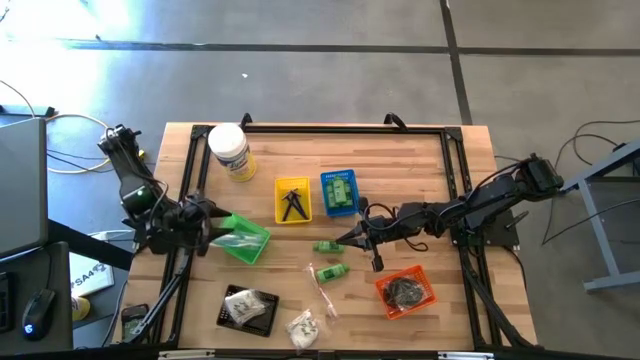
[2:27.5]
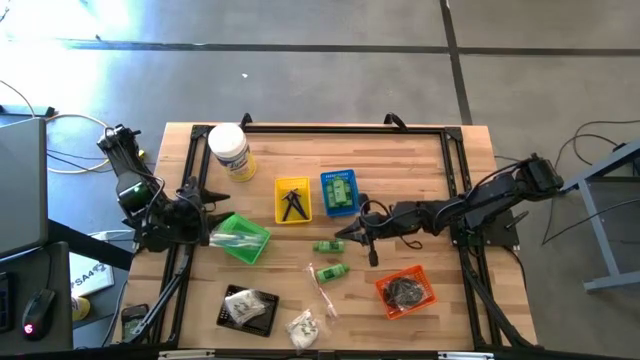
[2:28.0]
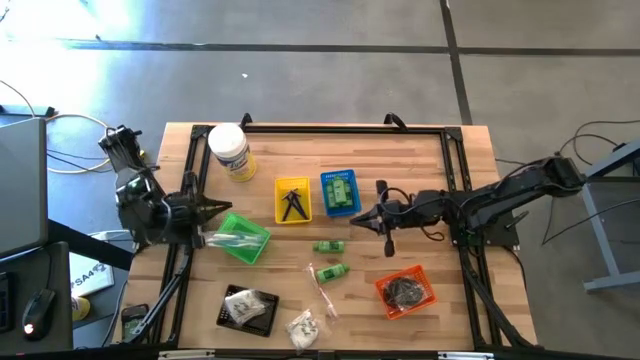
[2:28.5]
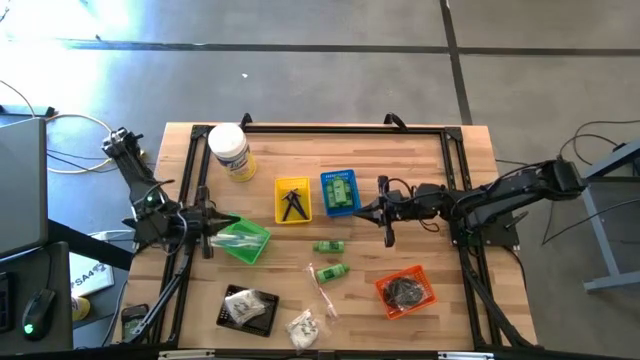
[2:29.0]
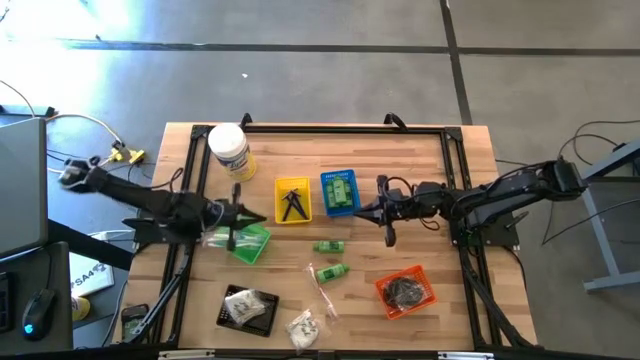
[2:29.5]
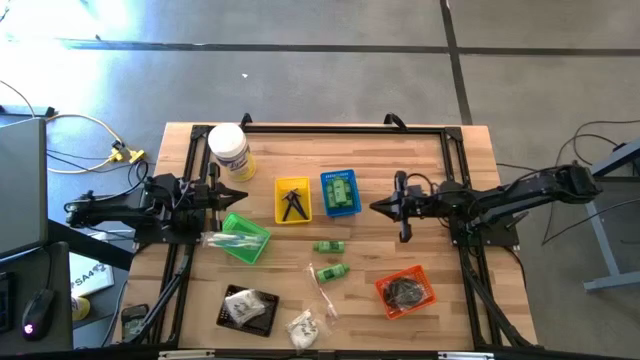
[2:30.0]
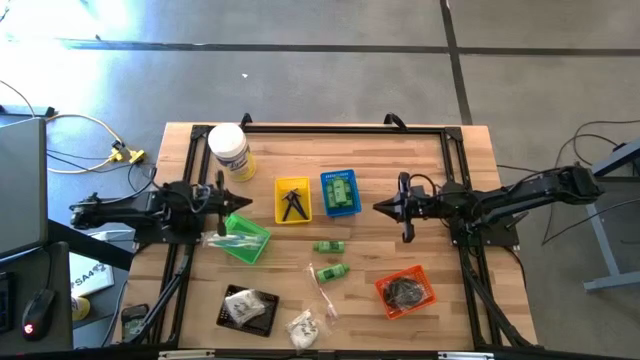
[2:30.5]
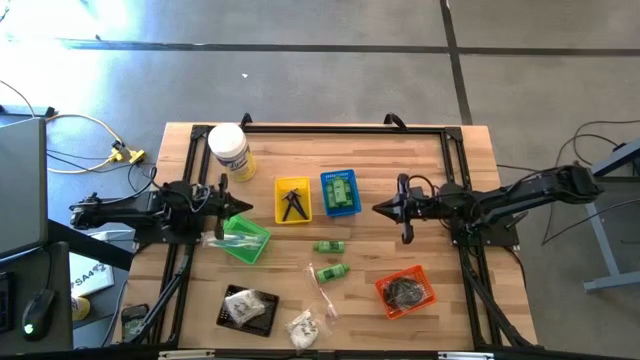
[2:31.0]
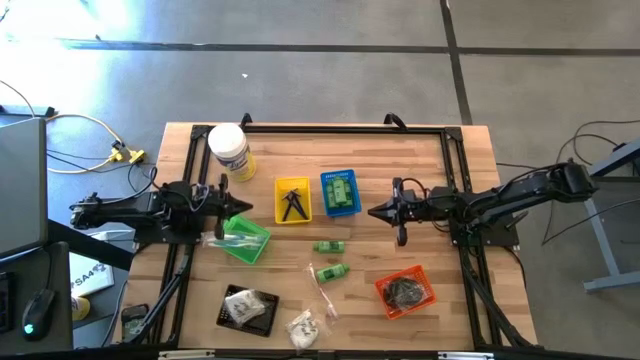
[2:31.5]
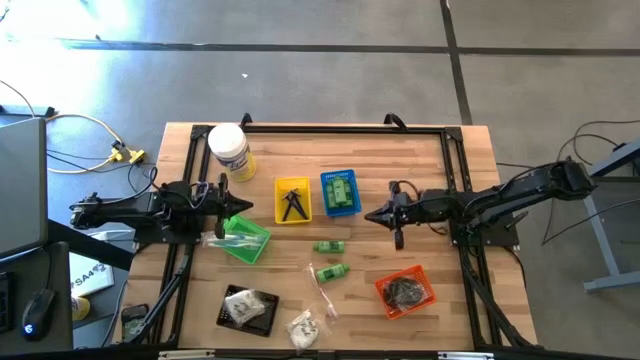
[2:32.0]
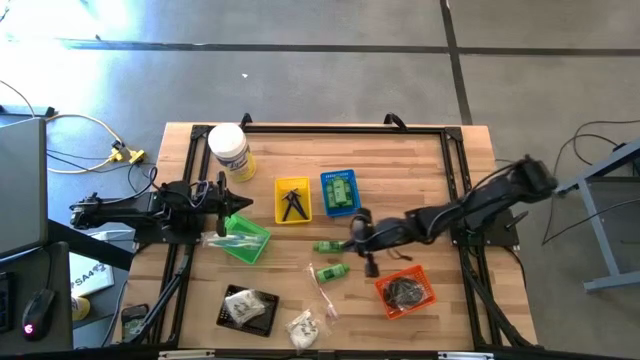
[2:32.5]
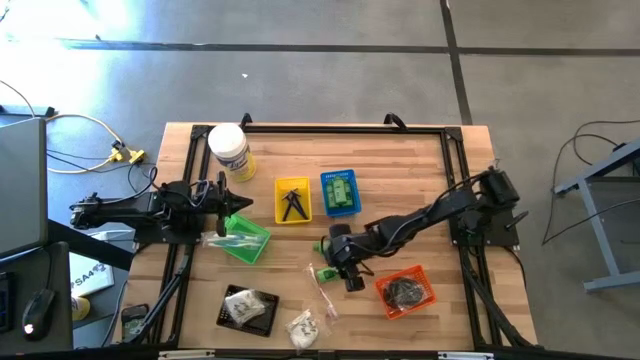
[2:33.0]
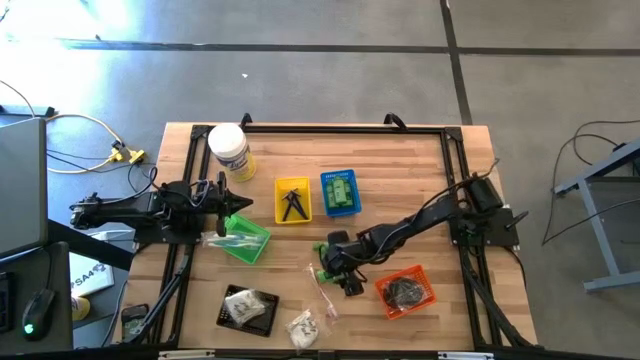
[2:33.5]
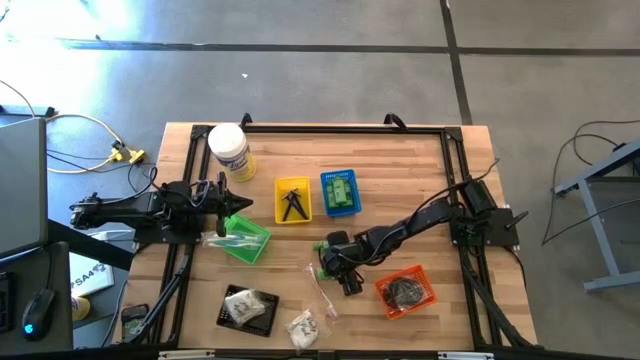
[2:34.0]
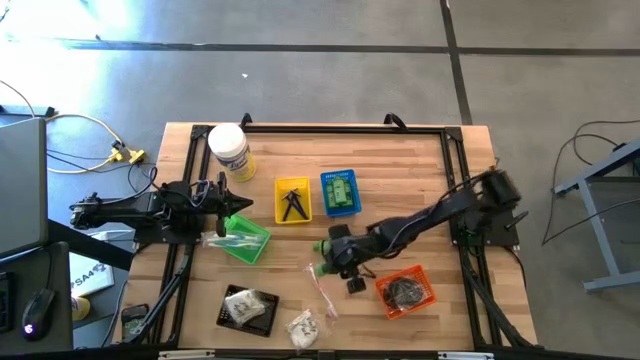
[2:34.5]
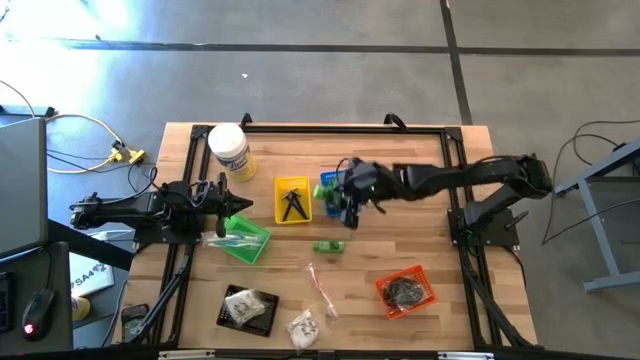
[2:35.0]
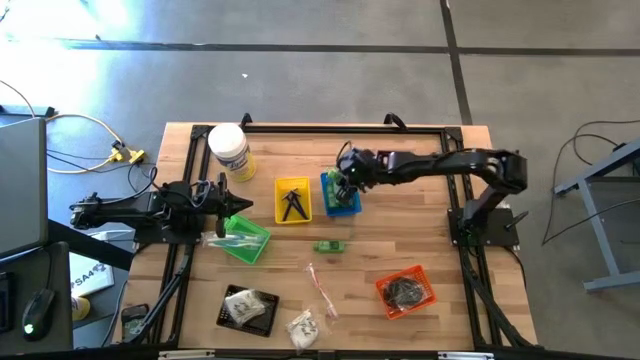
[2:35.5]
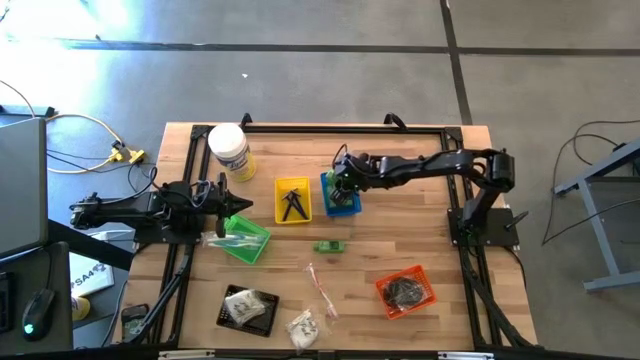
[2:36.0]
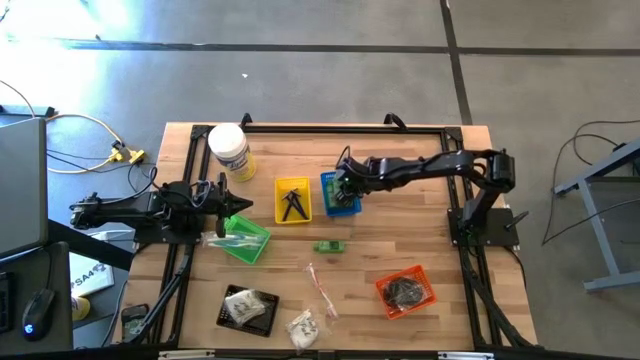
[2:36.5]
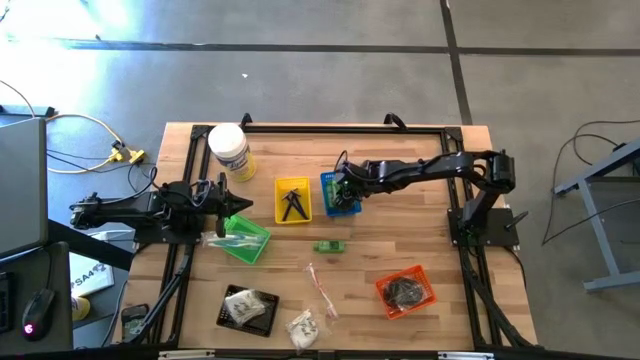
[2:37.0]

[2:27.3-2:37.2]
Task: Pick & Place Travel size toiletries
Put the shampoo into the blue bin

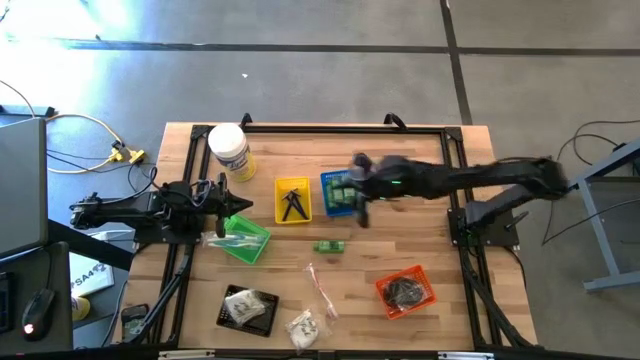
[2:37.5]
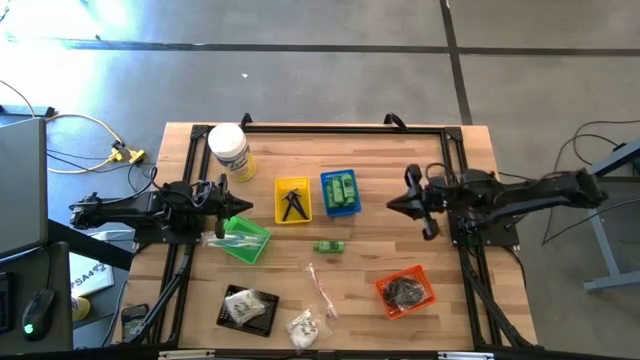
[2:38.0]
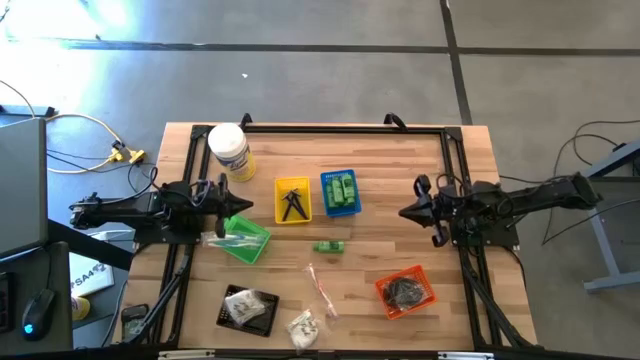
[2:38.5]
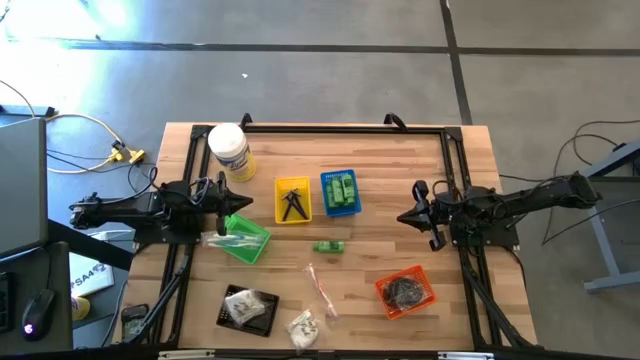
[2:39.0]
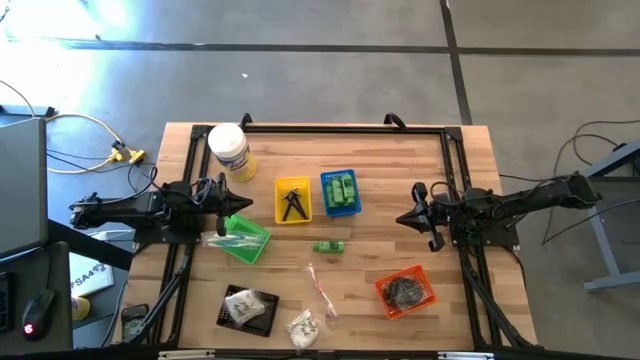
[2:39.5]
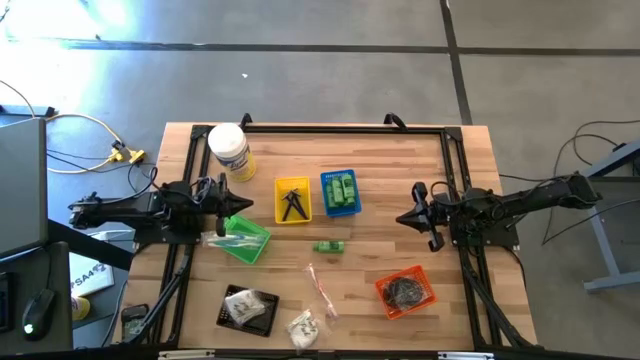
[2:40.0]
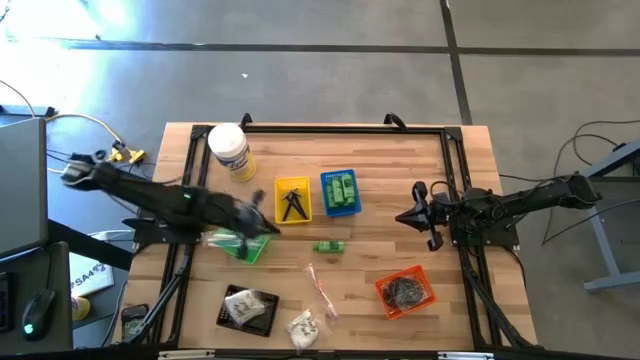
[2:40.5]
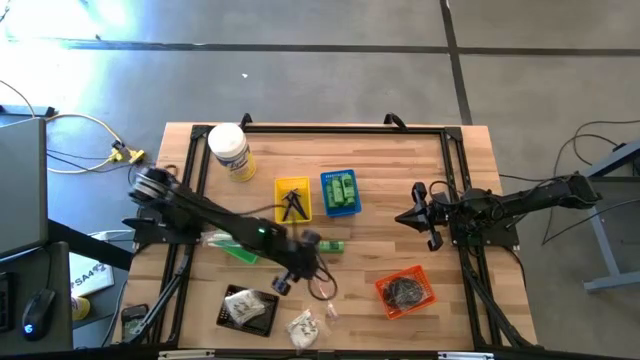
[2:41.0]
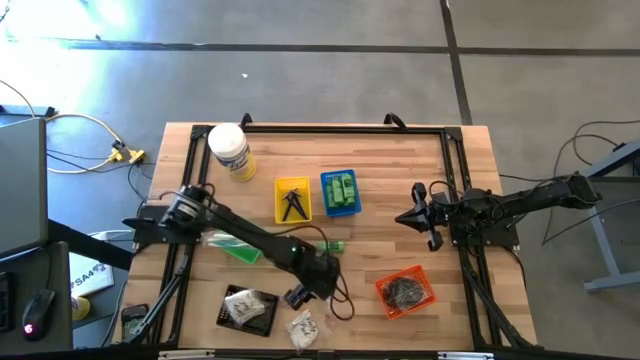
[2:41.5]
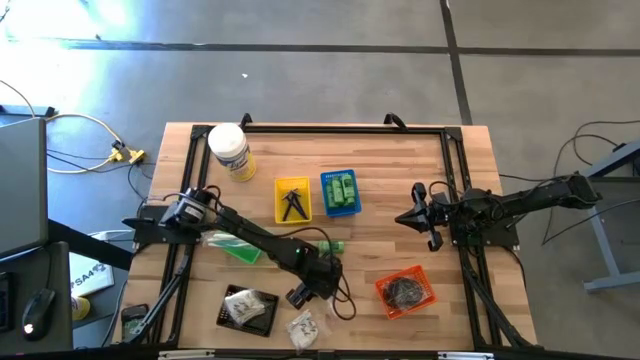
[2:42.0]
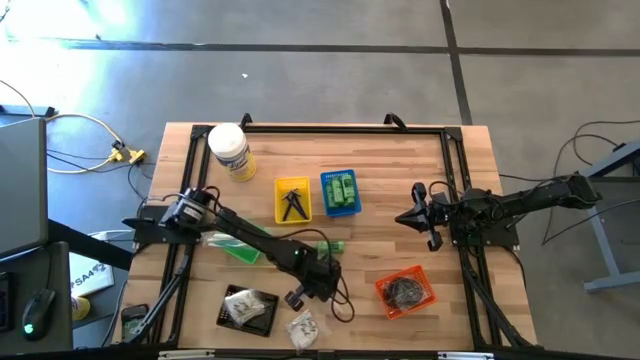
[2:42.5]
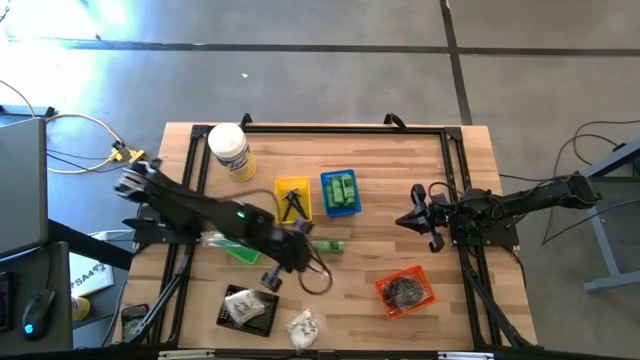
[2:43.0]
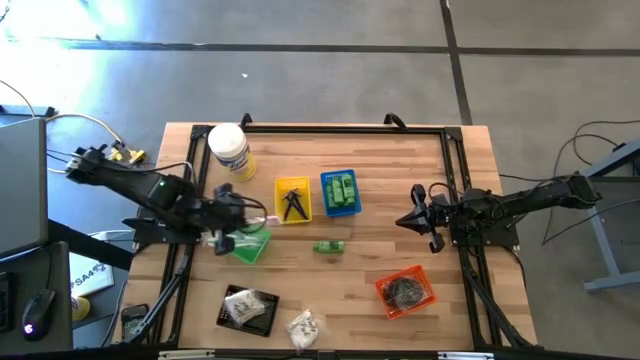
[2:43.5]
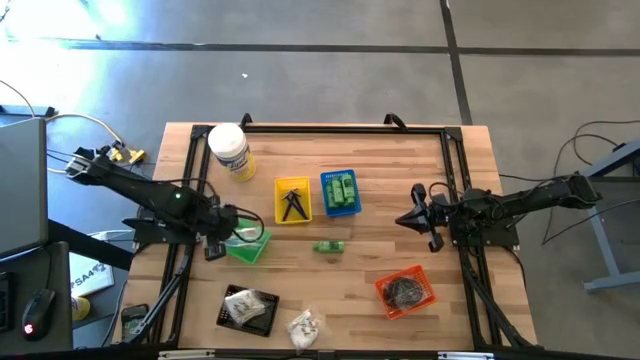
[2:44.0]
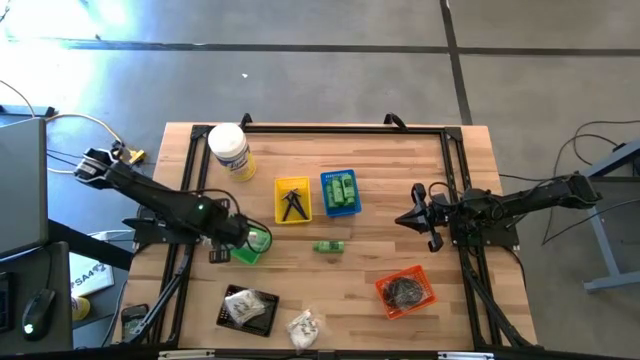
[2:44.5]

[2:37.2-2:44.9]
Put the red toothbrush into the green bin

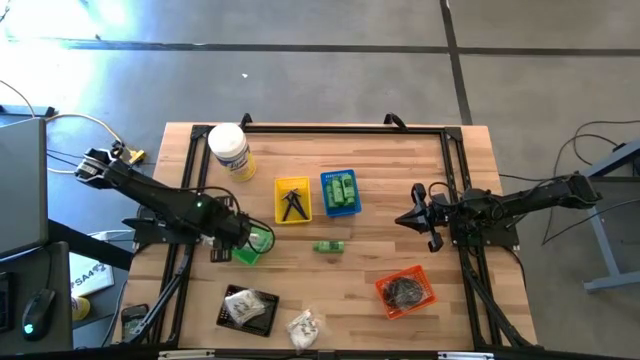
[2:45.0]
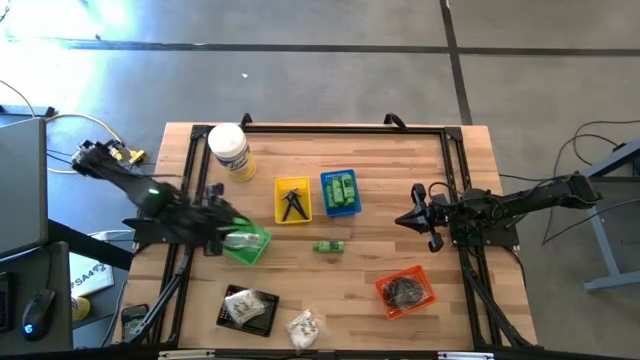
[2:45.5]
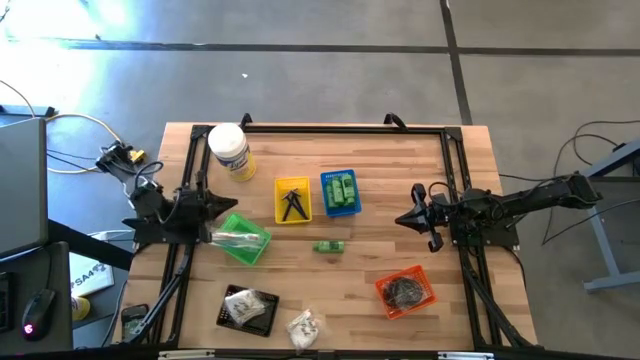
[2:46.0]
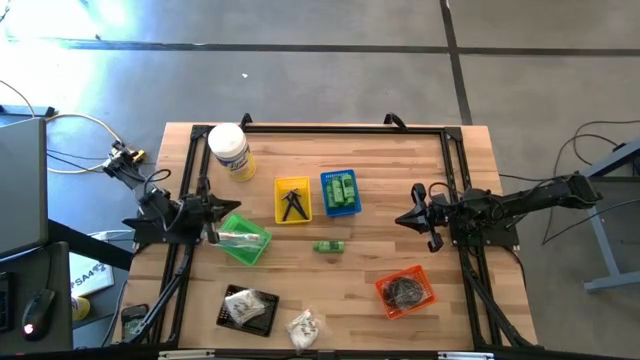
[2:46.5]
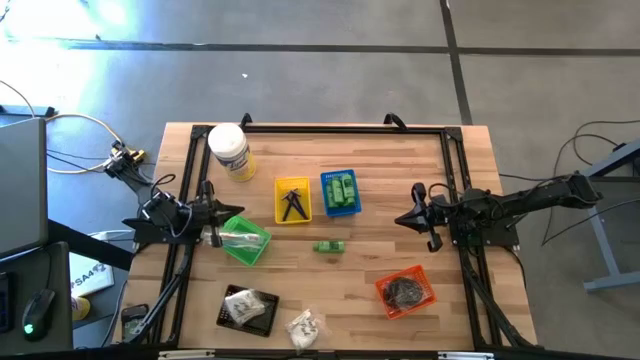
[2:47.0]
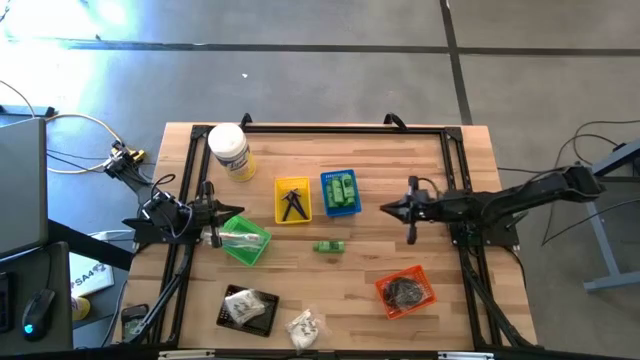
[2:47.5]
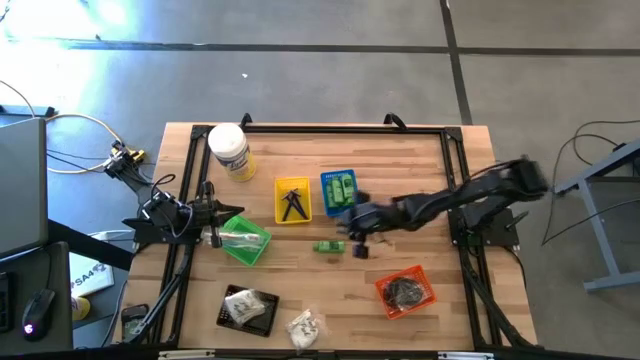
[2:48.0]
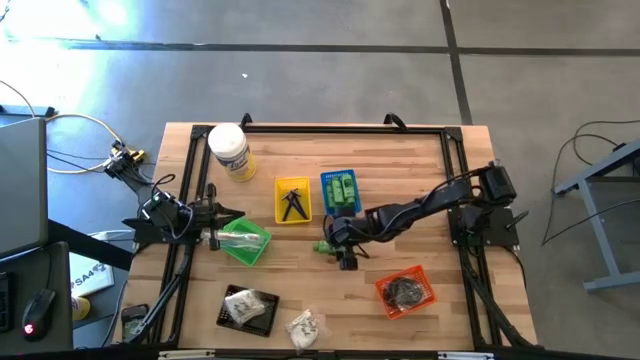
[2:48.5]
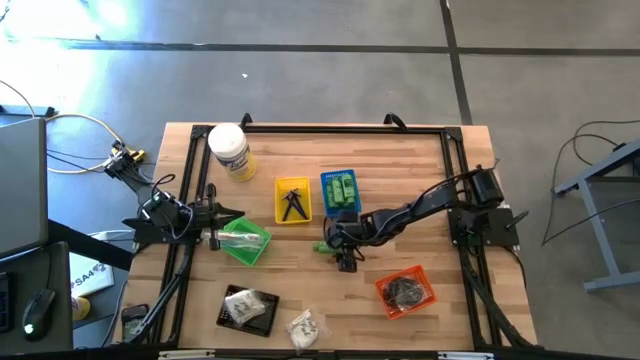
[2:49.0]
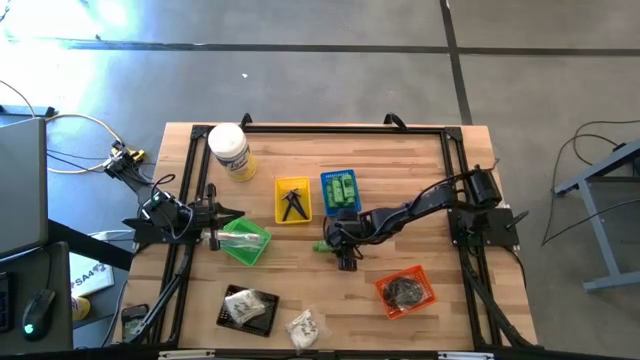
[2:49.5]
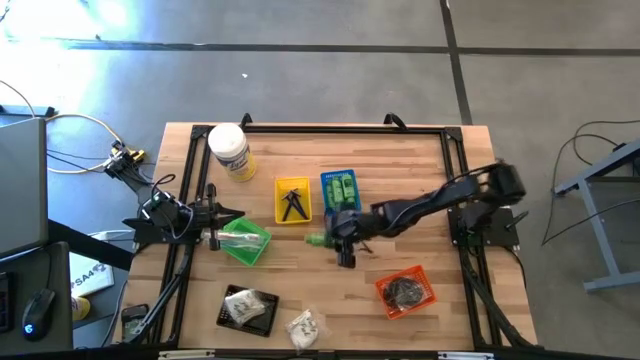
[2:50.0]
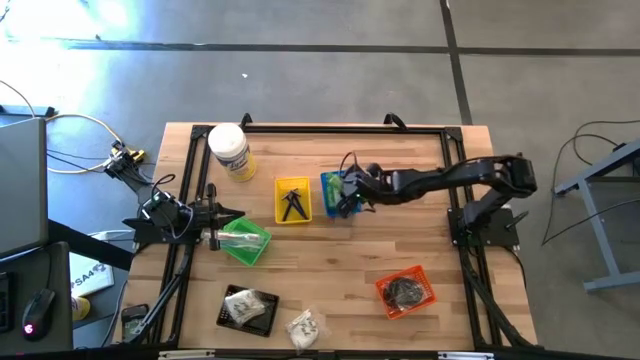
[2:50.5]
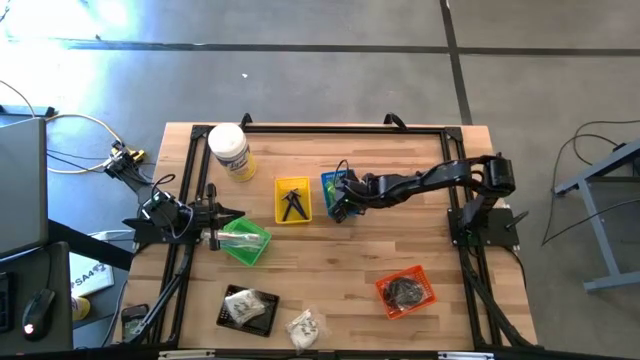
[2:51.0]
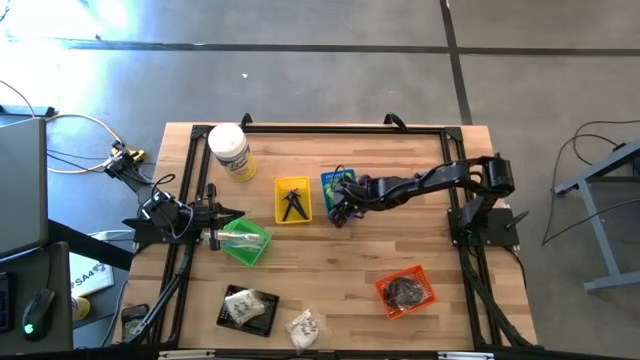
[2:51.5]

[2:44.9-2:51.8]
Put the shampoo into the blue bin
